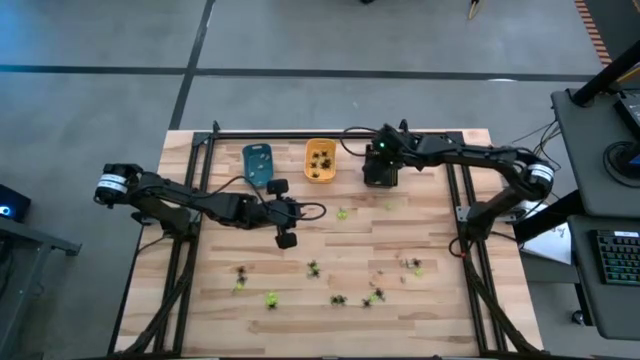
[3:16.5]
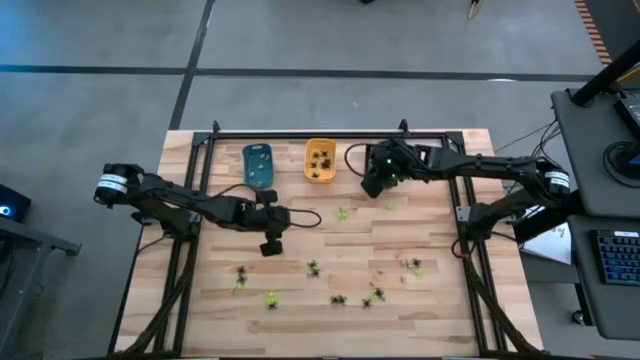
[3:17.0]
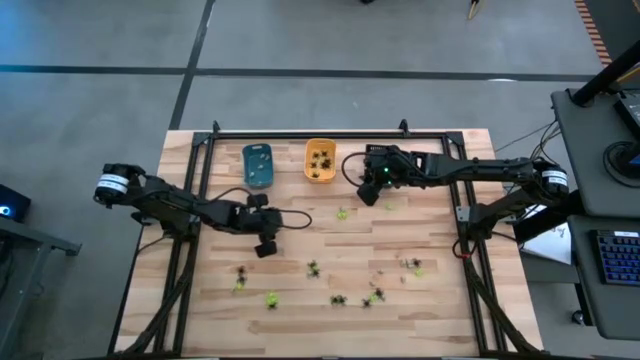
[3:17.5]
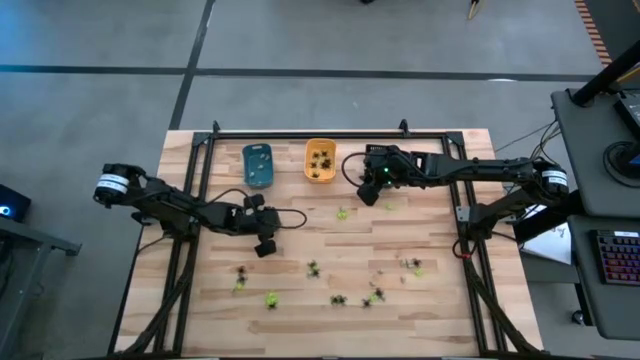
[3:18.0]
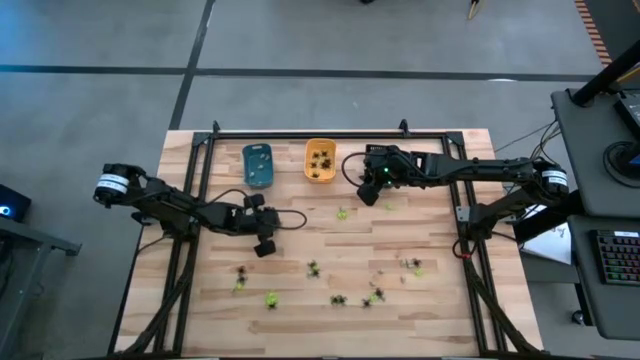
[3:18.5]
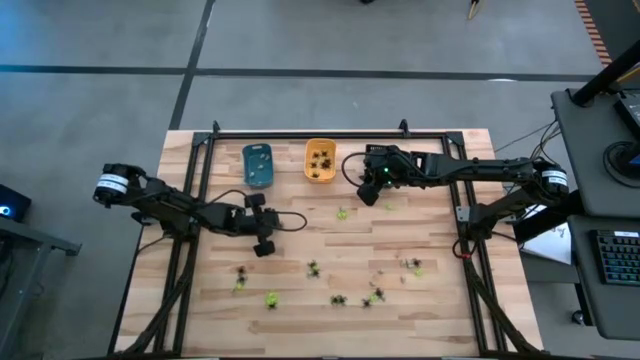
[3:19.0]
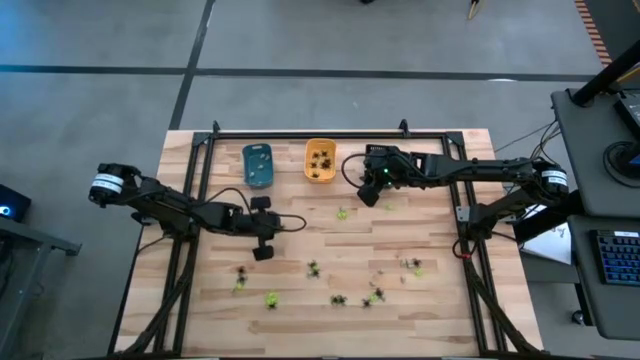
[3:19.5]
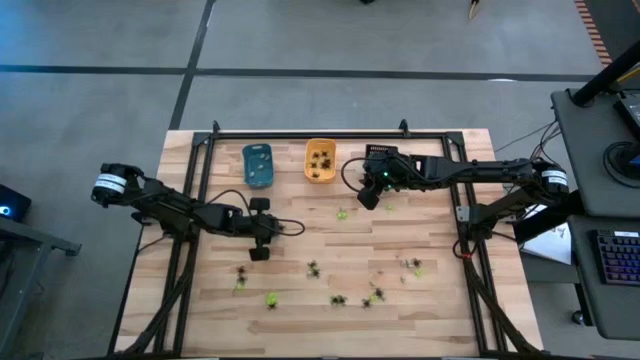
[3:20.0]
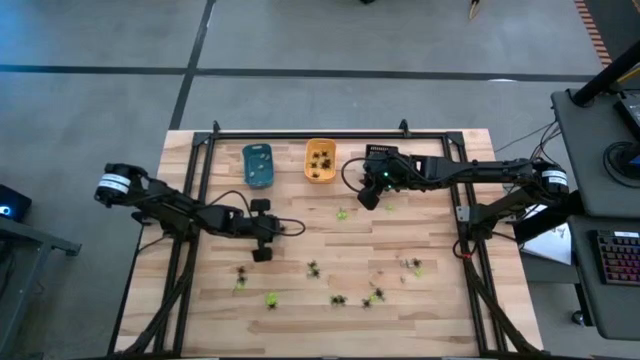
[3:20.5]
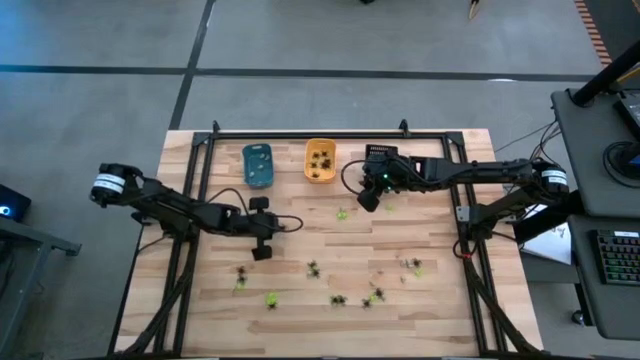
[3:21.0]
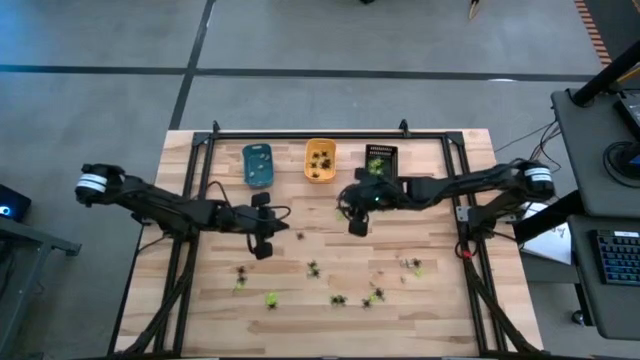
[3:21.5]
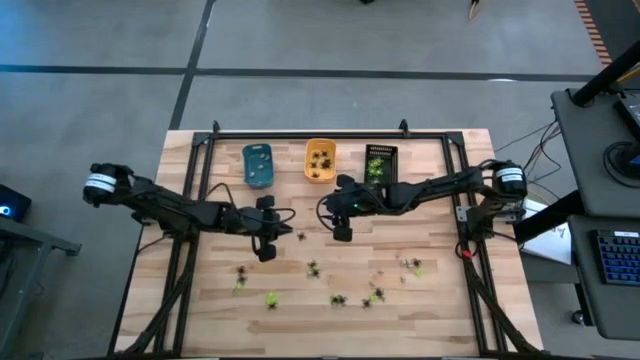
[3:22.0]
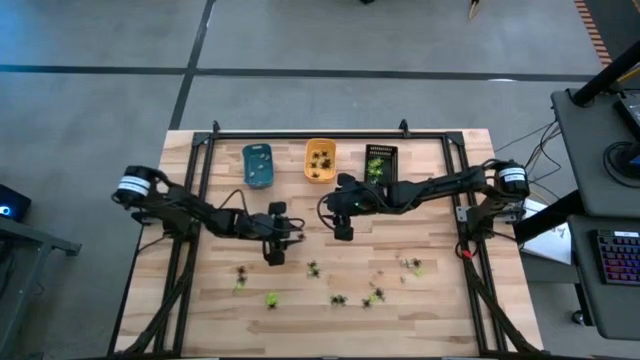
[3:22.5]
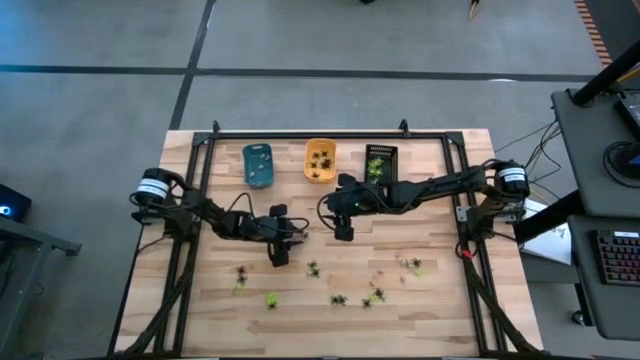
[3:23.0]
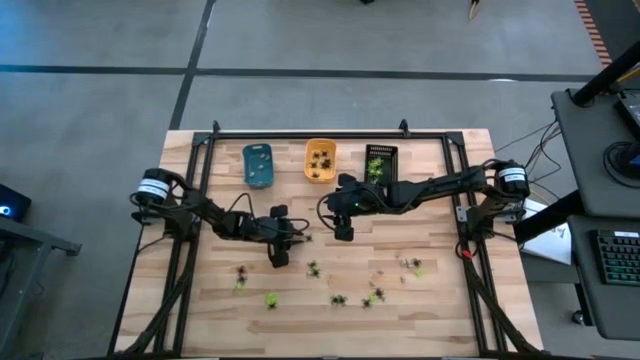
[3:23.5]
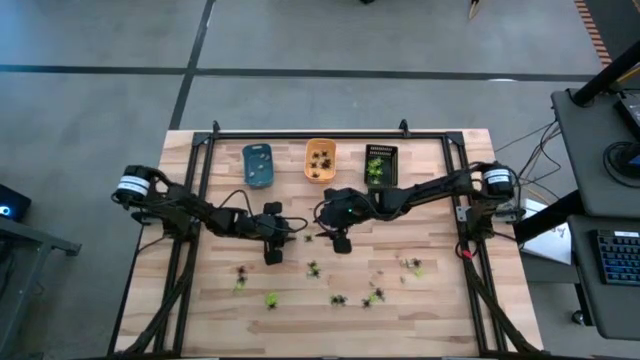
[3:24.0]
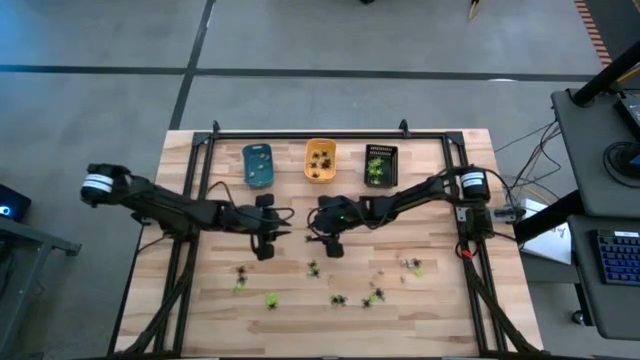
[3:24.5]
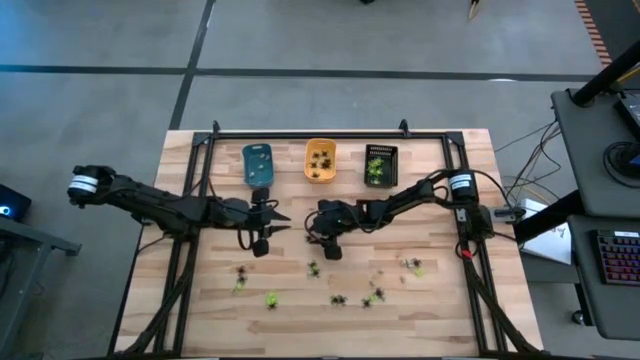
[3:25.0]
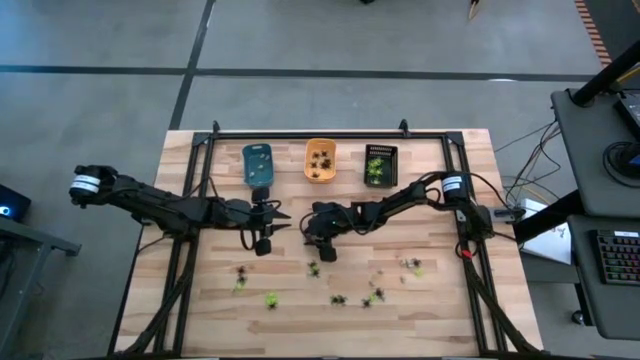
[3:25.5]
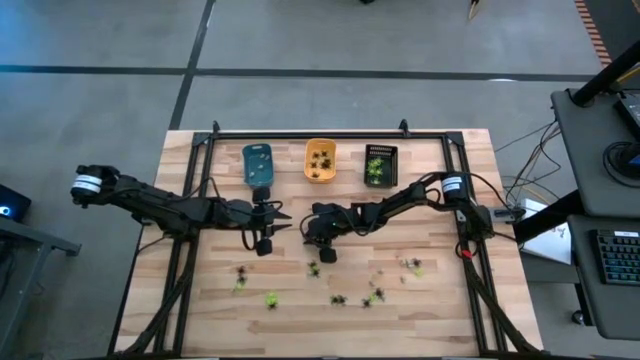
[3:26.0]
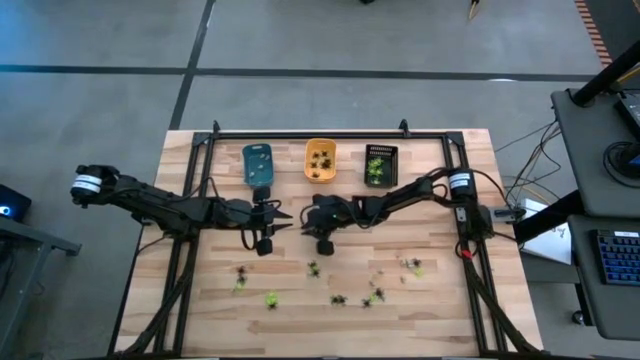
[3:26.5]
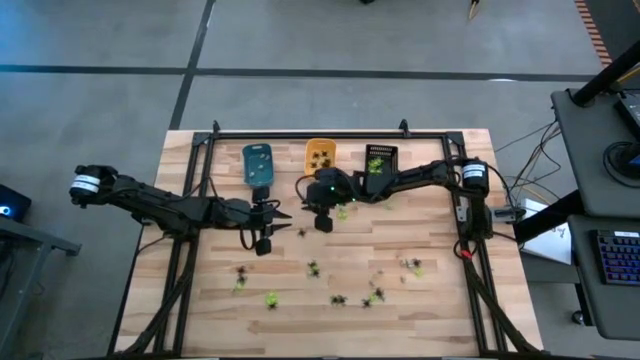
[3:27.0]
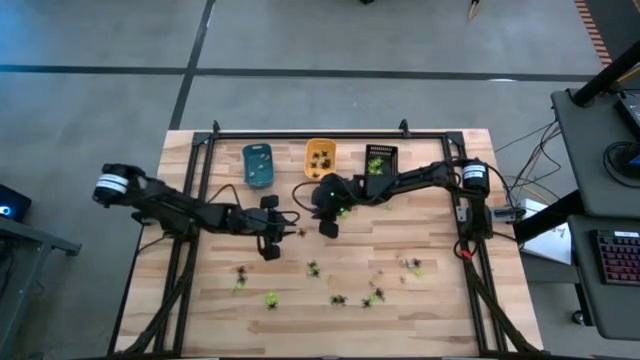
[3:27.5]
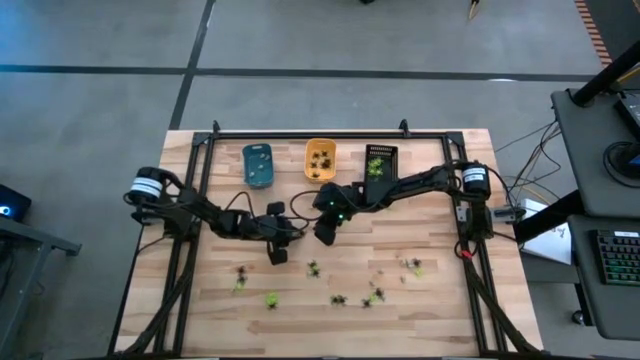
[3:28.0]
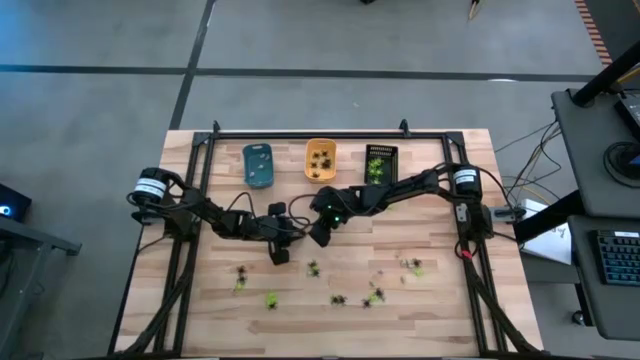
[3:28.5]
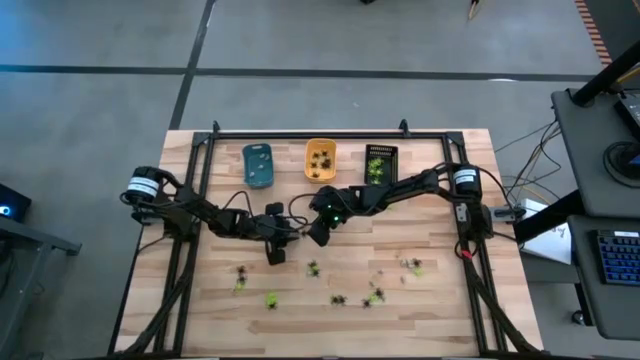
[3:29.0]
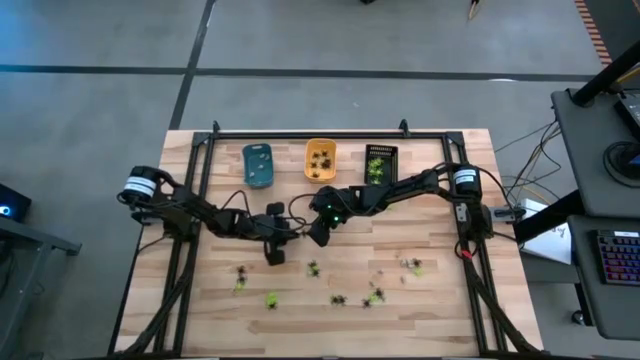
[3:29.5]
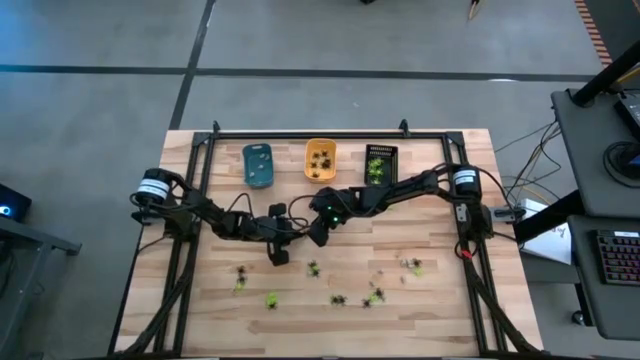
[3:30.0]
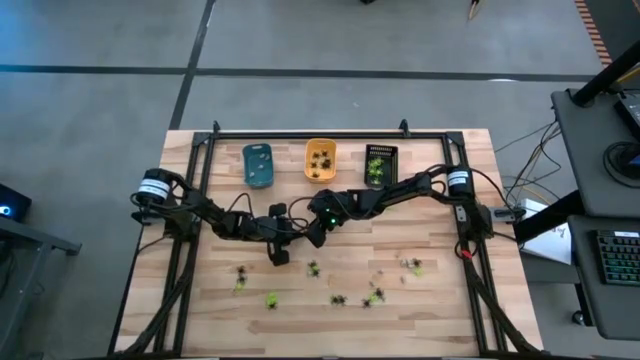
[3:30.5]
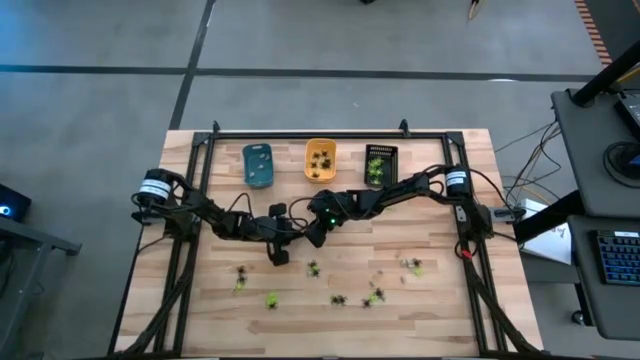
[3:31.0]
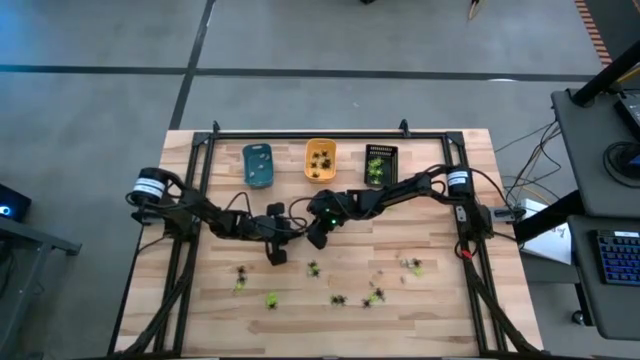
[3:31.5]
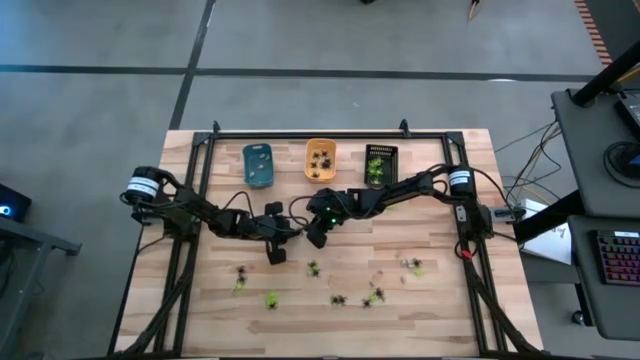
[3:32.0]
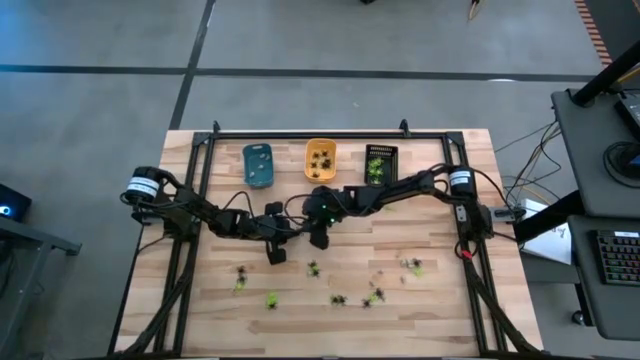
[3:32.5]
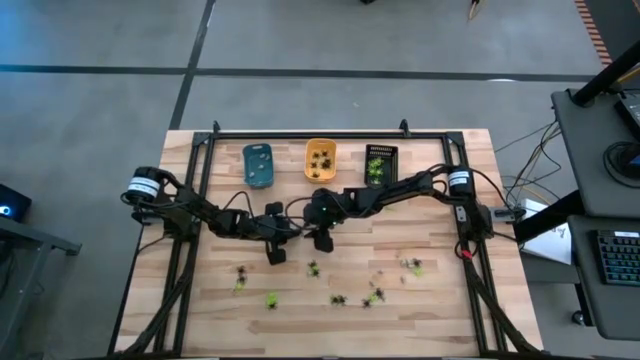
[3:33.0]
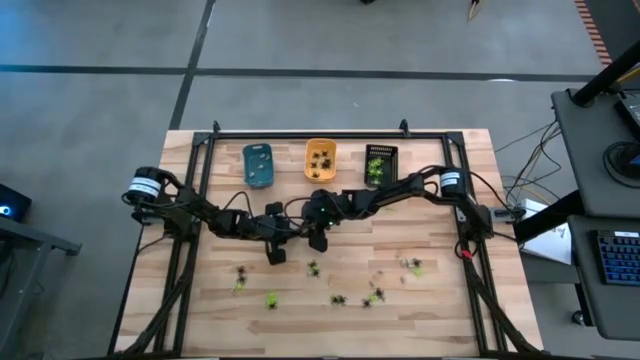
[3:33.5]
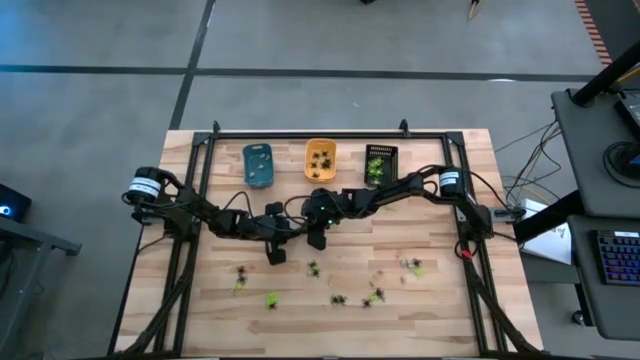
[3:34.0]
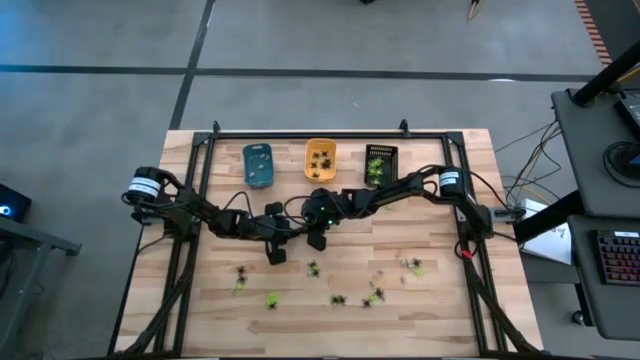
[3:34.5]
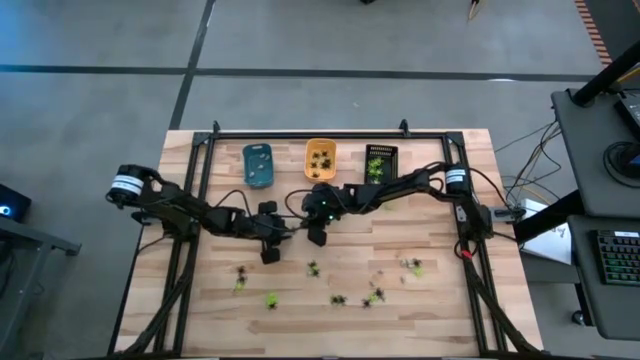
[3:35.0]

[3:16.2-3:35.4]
Task: Sort Halloween decoration
Put the black spider toy into the orange bin

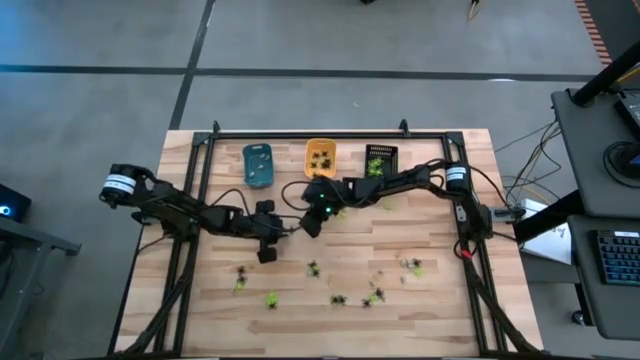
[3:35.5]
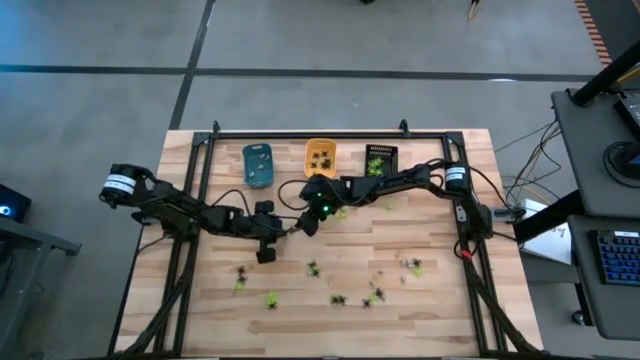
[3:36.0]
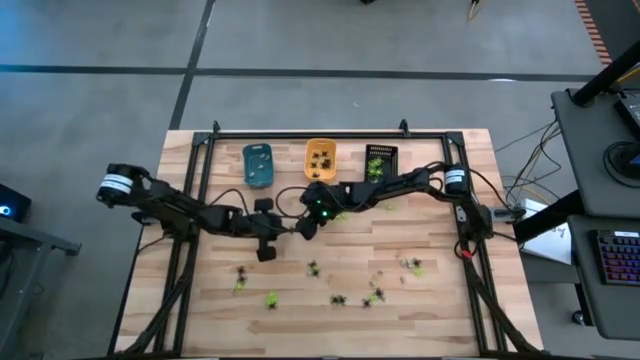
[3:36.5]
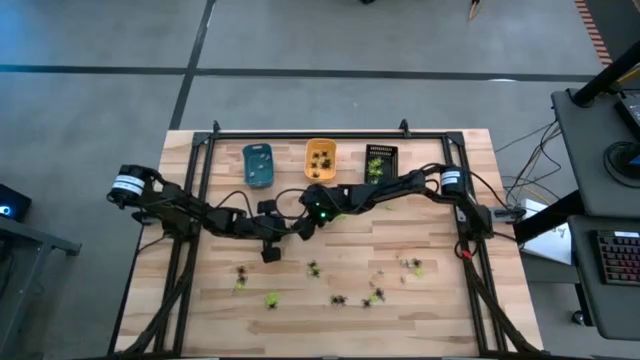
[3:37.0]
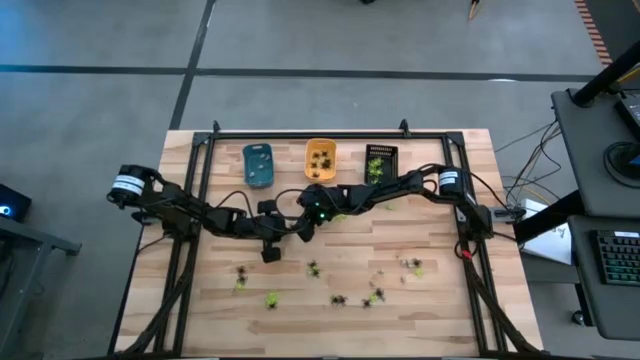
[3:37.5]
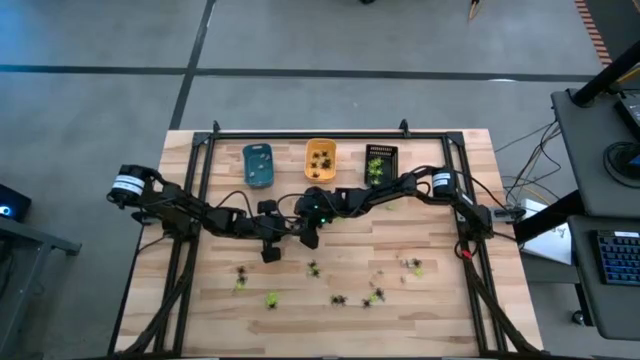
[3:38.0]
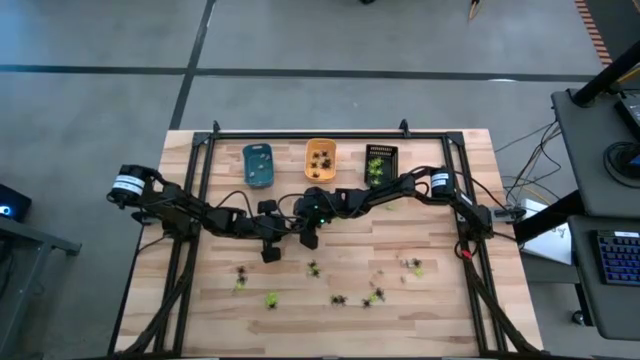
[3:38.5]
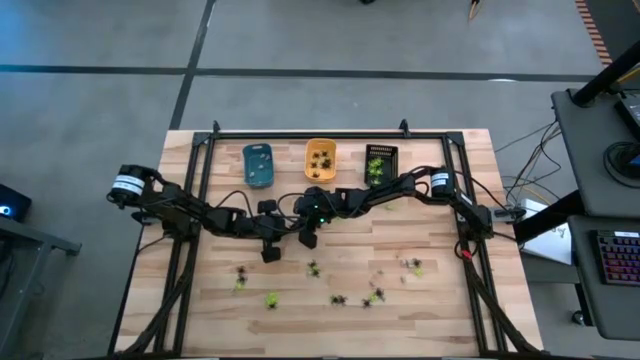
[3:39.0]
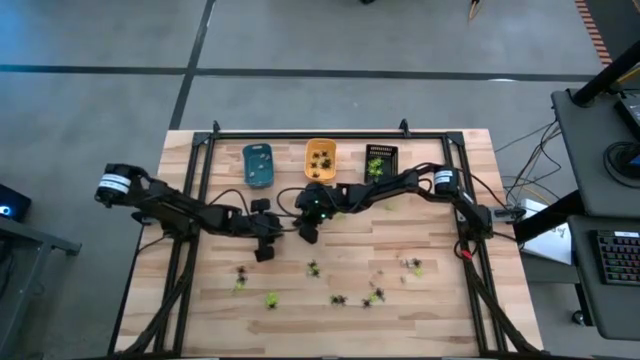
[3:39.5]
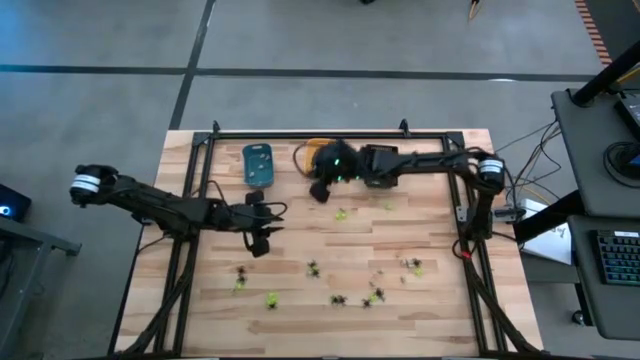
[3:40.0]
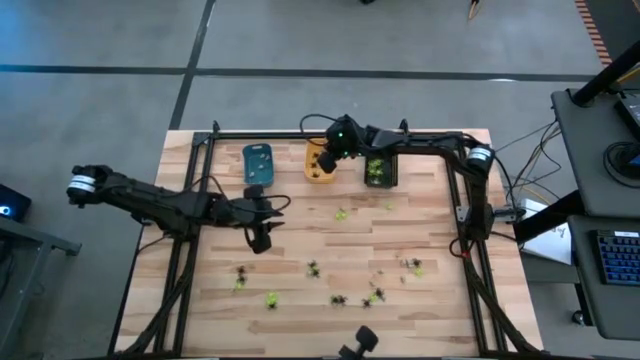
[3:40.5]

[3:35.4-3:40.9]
Put the black spider toy into the orange bin
